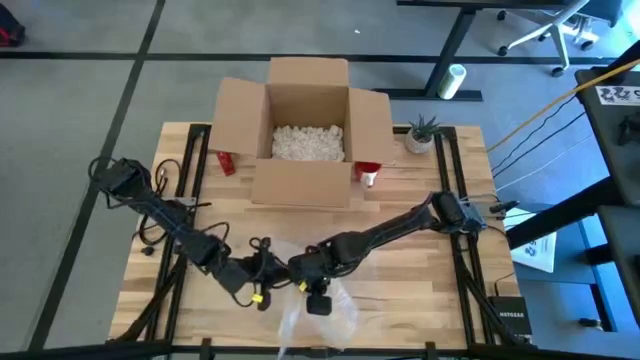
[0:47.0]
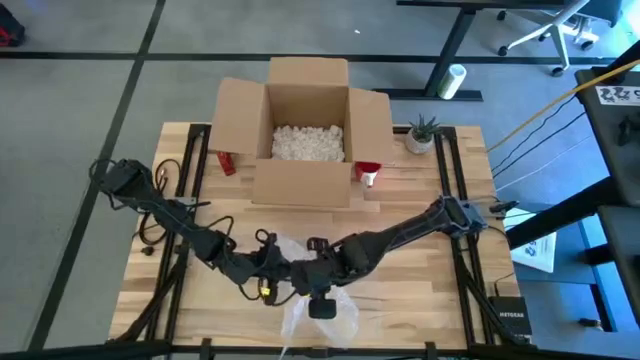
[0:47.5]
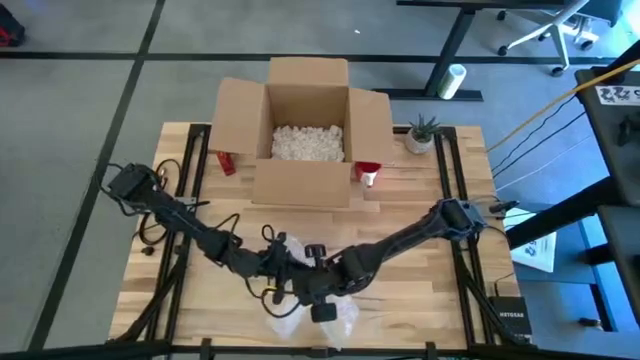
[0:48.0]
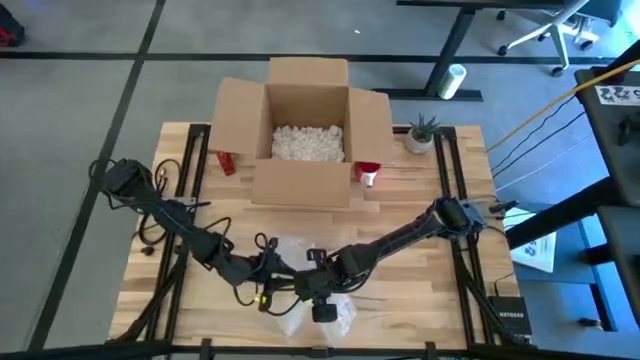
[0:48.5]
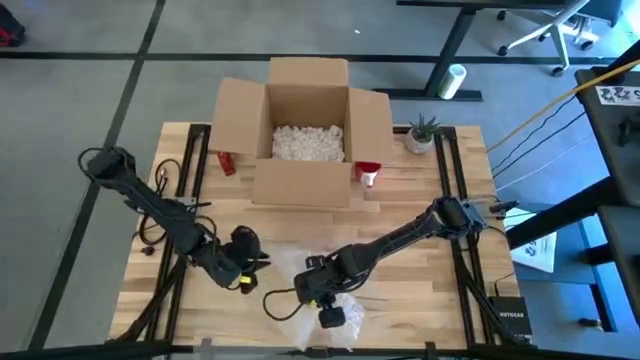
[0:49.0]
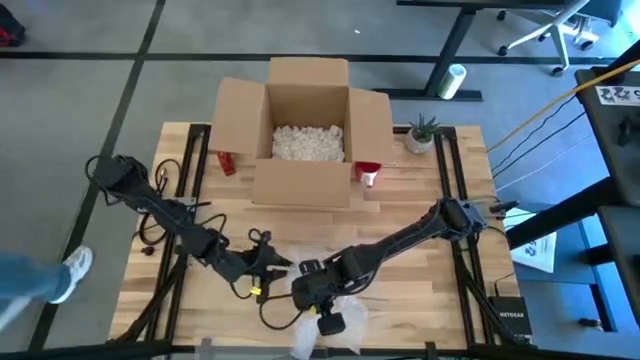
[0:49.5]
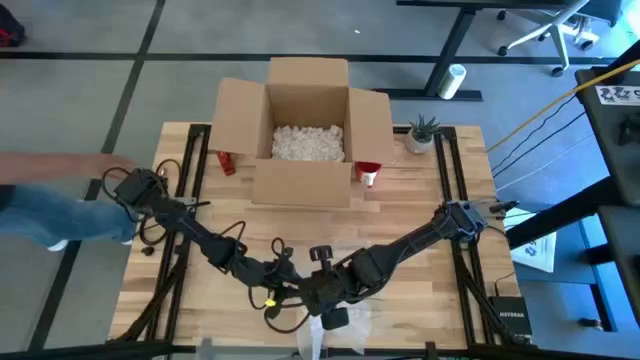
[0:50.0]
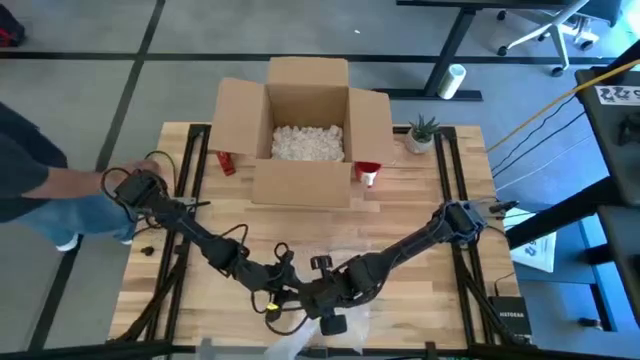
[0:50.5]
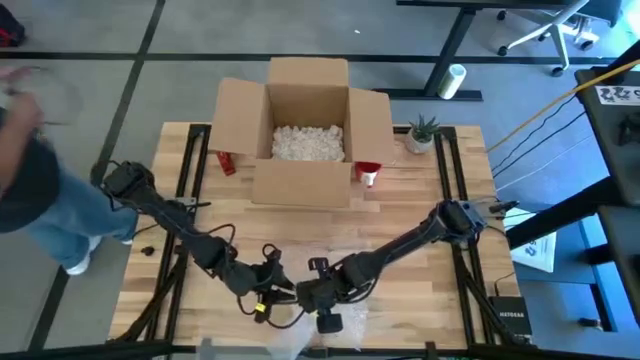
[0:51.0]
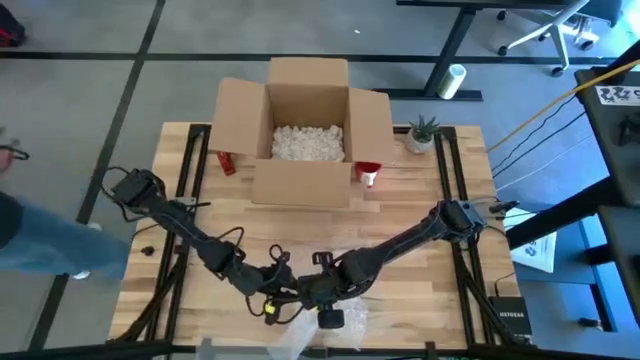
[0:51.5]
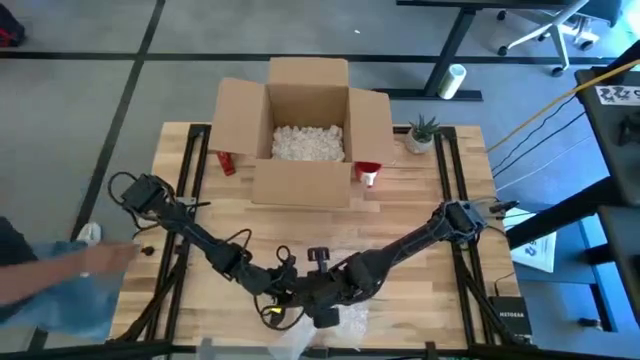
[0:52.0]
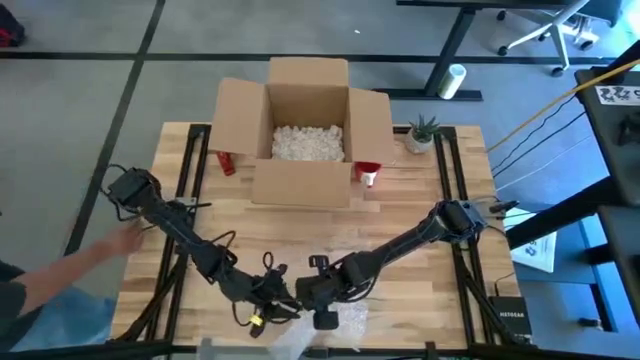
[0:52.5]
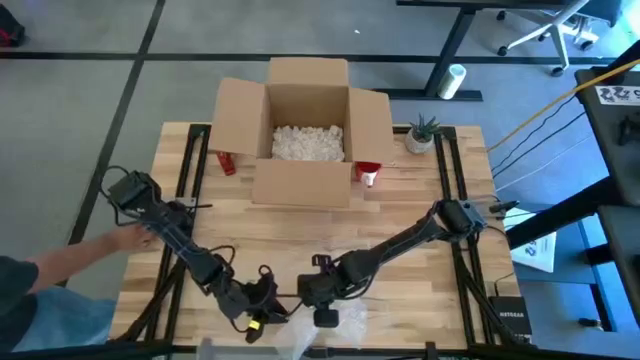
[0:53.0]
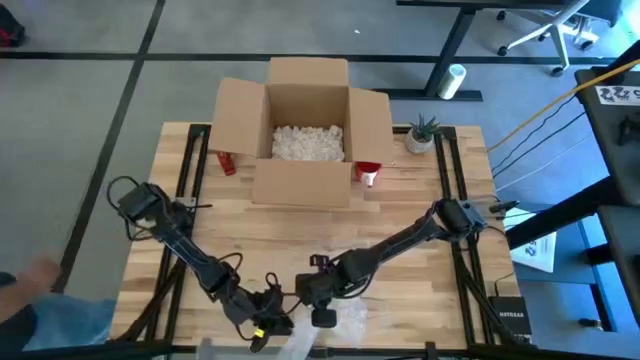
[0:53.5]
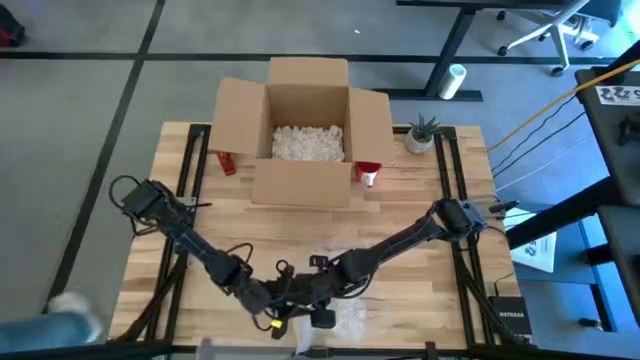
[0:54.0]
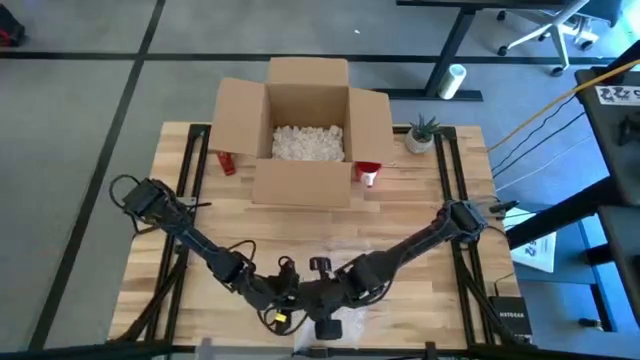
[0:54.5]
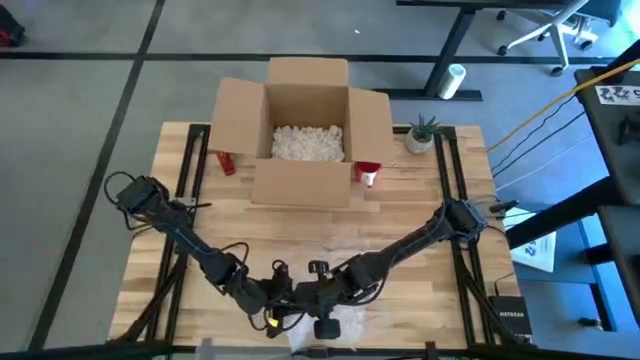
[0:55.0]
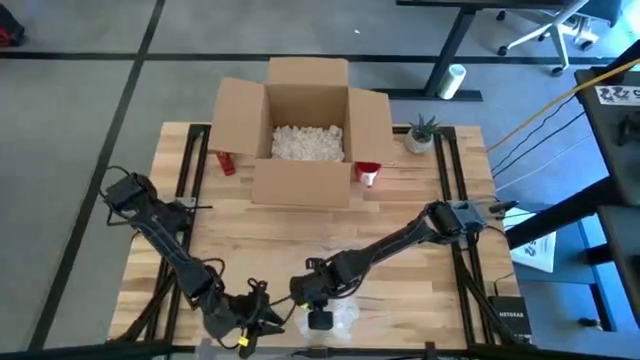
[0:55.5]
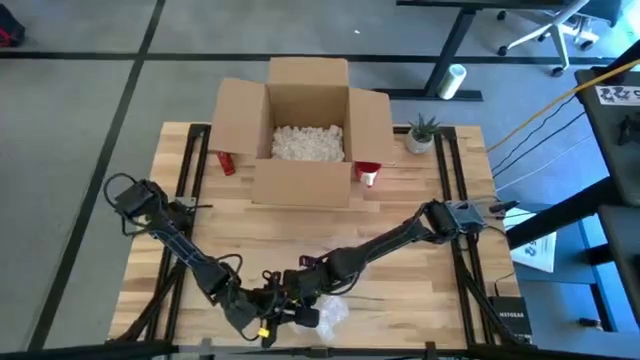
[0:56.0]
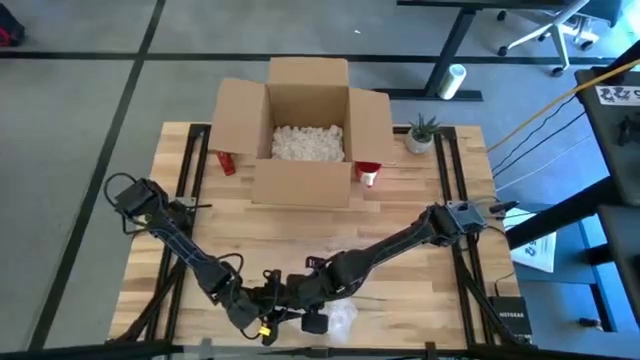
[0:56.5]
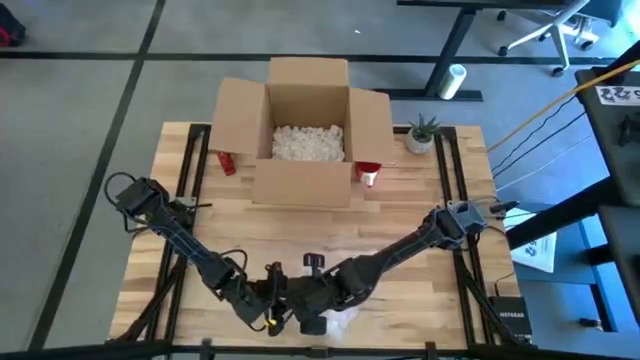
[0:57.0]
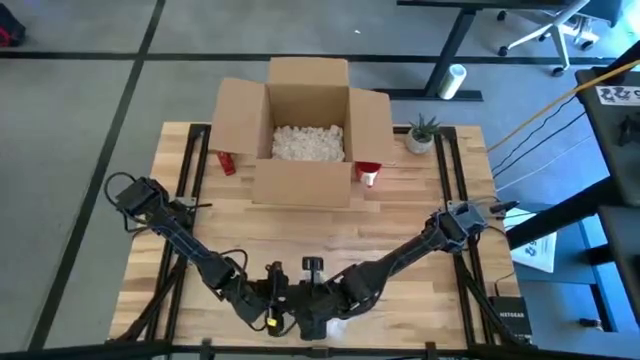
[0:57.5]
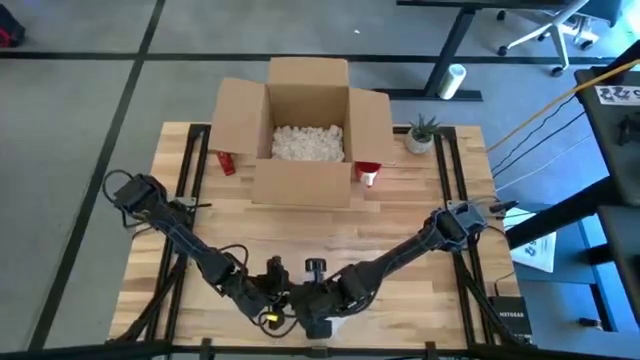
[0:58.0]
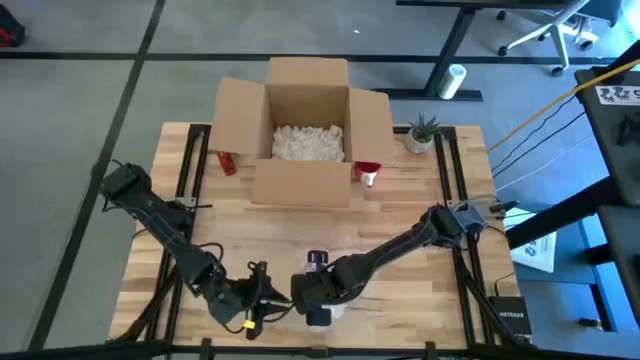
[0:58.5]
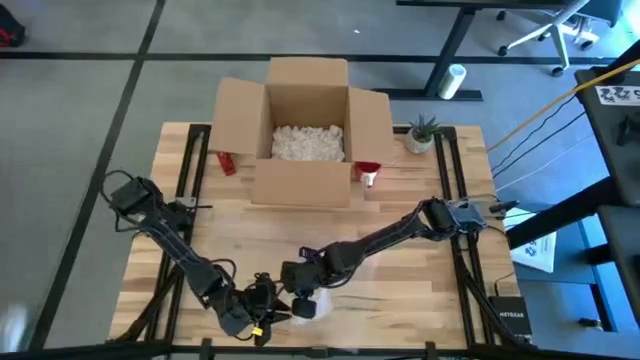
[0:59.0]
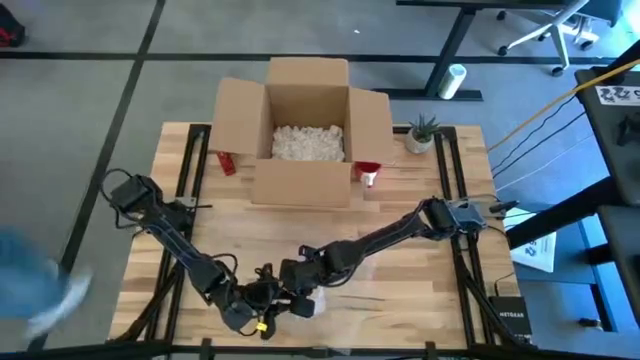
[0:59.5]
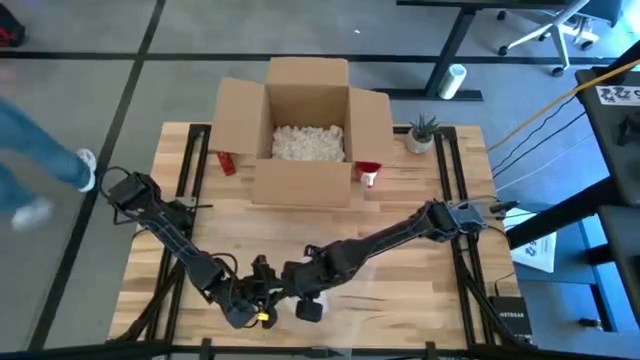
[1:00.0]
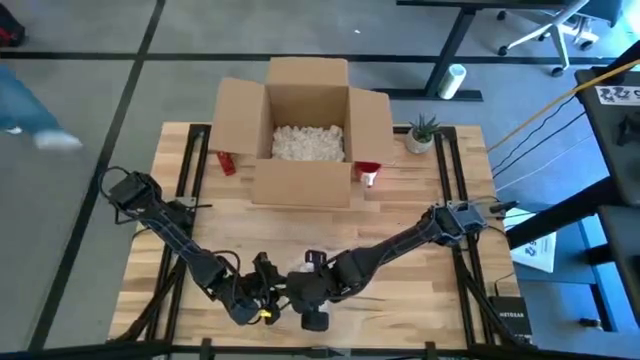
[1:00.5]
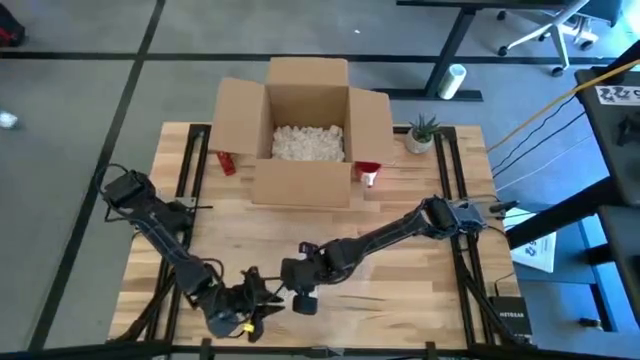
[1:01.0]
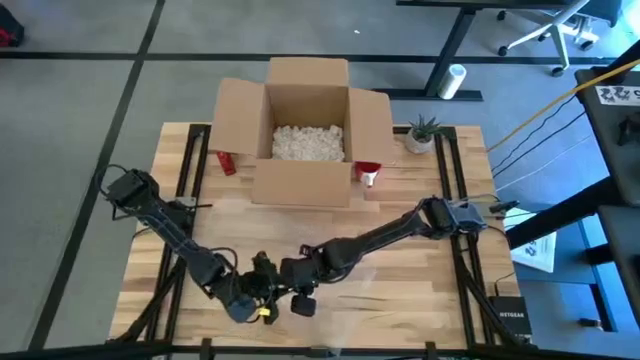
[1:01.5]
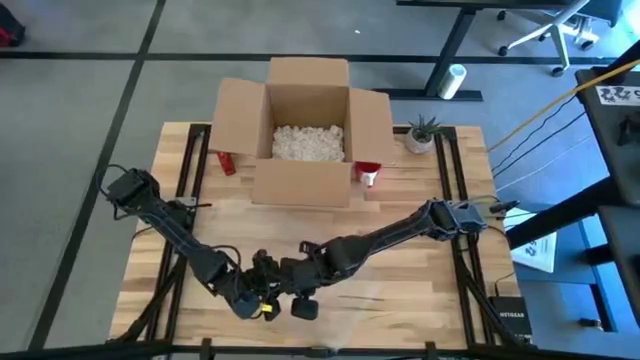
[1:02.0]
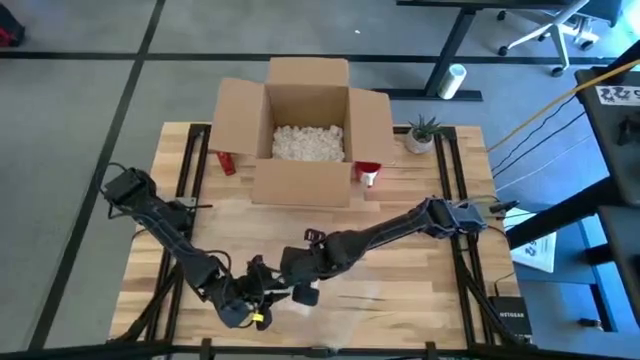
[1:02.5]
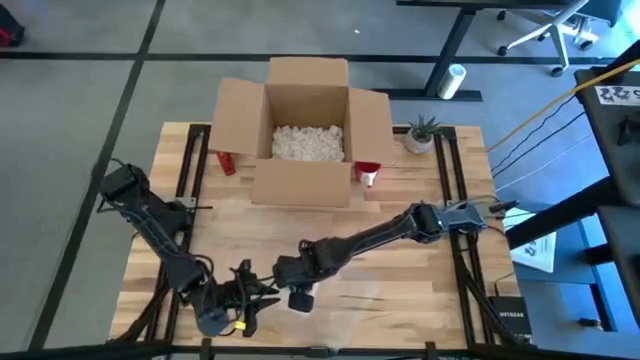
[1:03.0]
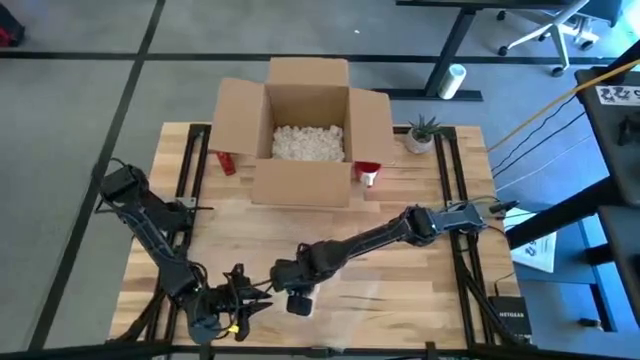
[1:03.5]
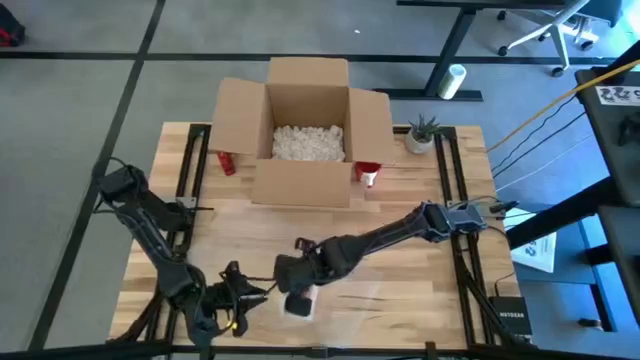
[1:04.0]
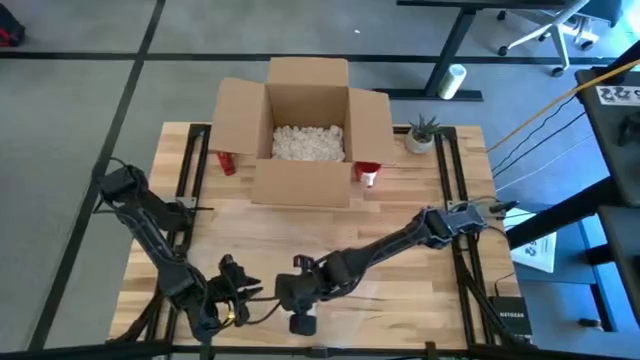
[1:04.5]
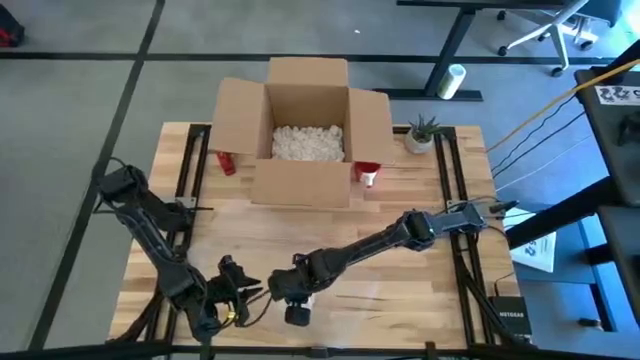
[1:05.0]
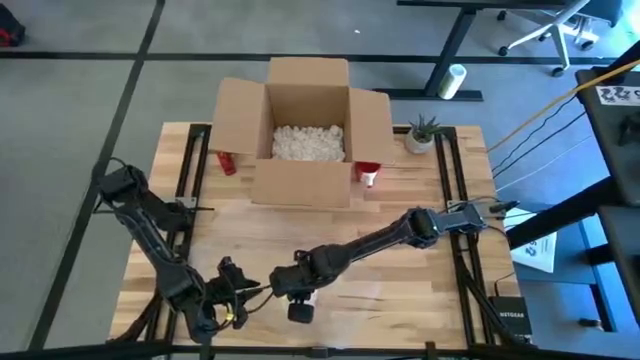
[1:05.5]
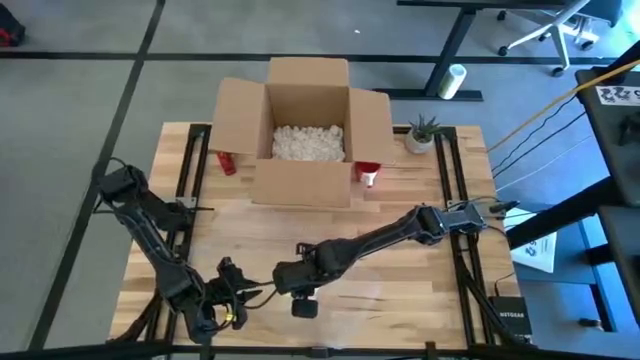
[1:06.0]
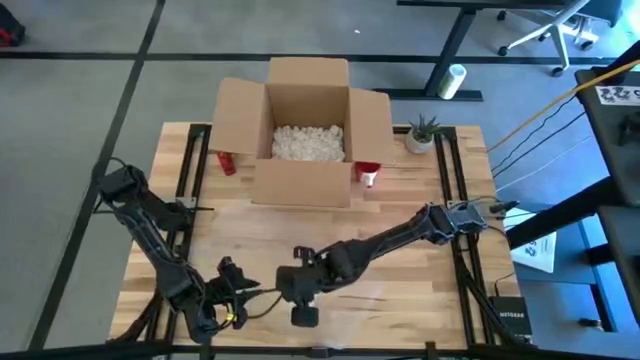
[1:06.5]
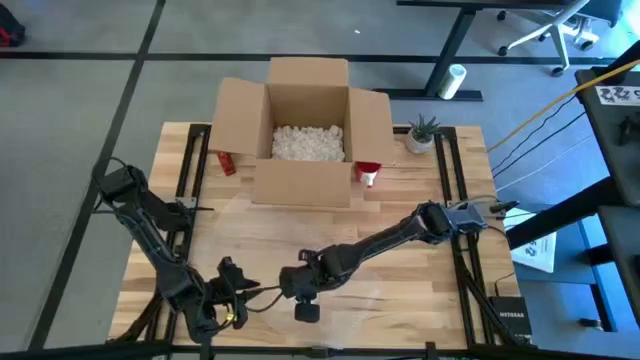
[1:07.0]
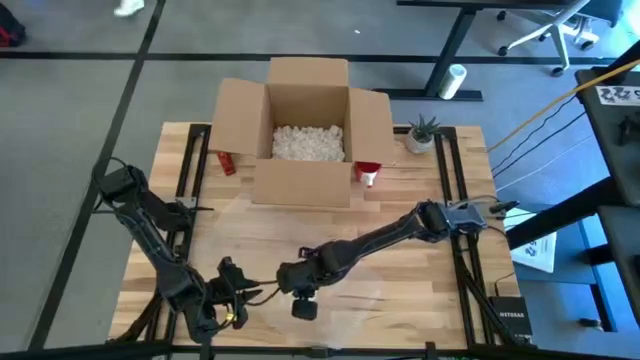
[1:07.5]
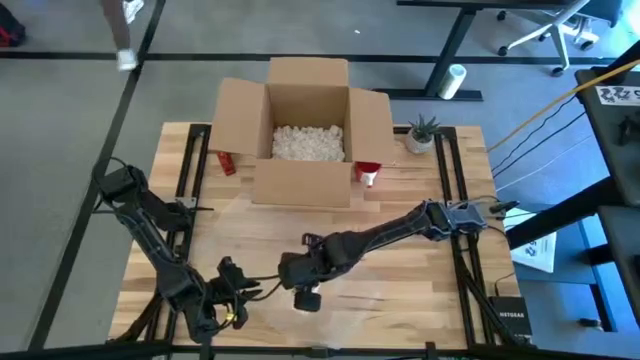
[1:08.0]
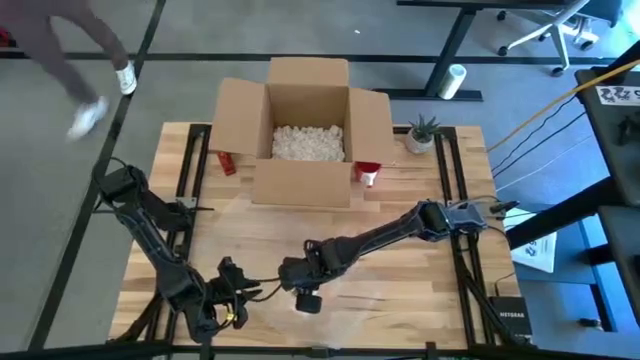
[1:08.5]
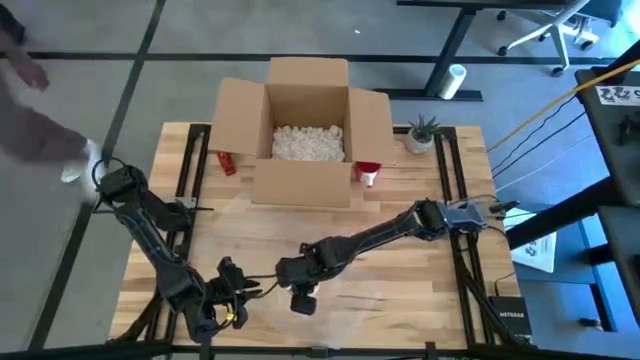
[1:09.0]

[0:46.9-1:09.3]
Task: wrap mug
Wrap the yellow mug with bubble wrap
